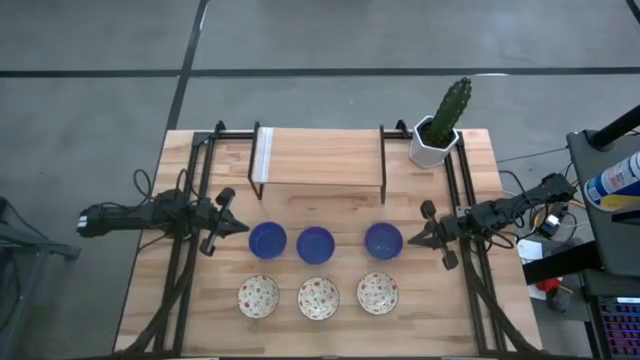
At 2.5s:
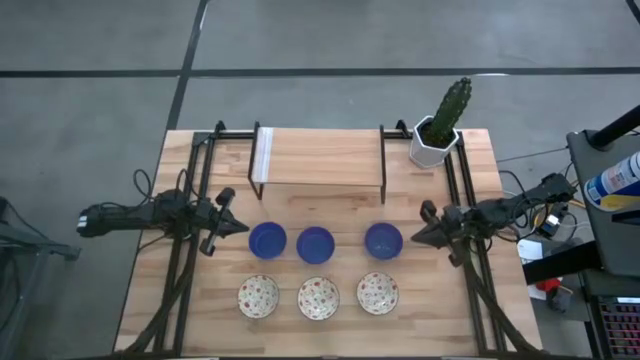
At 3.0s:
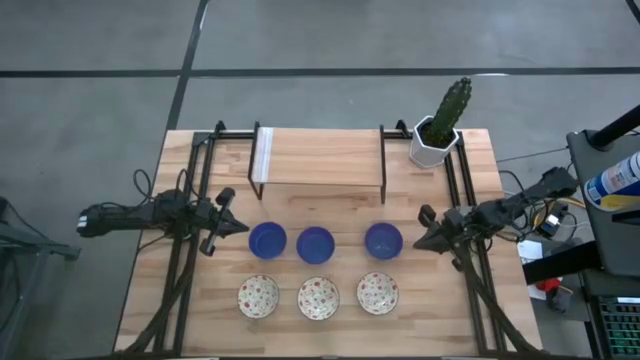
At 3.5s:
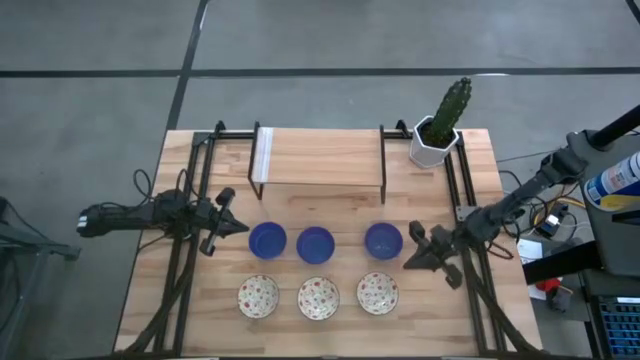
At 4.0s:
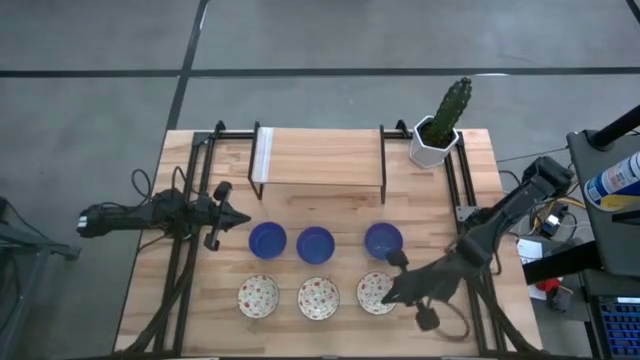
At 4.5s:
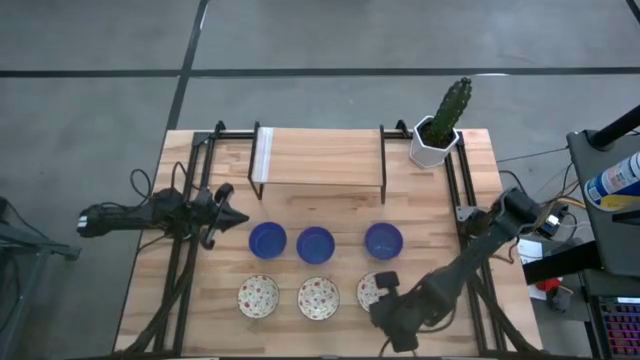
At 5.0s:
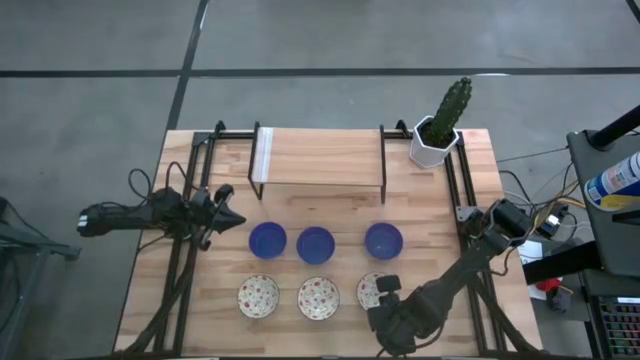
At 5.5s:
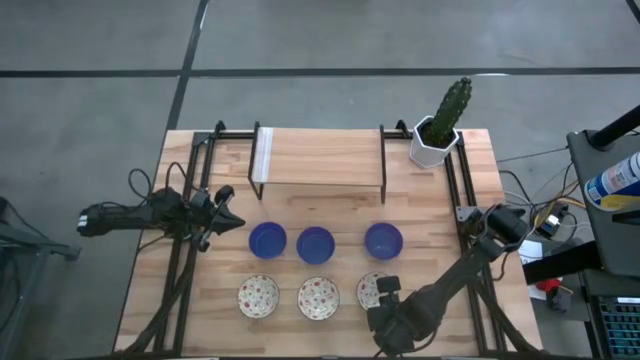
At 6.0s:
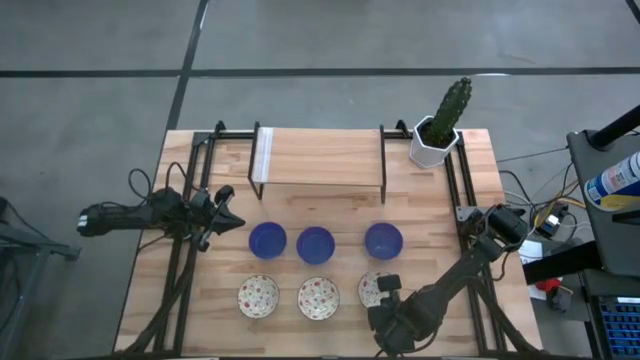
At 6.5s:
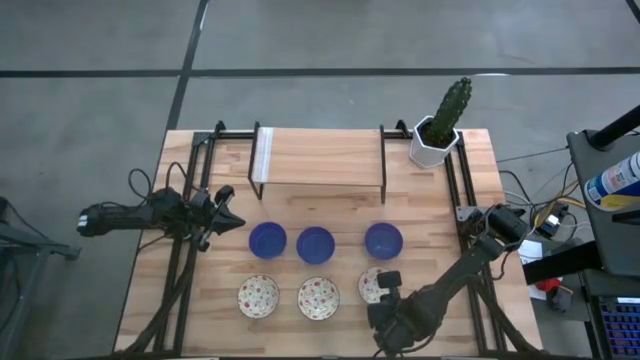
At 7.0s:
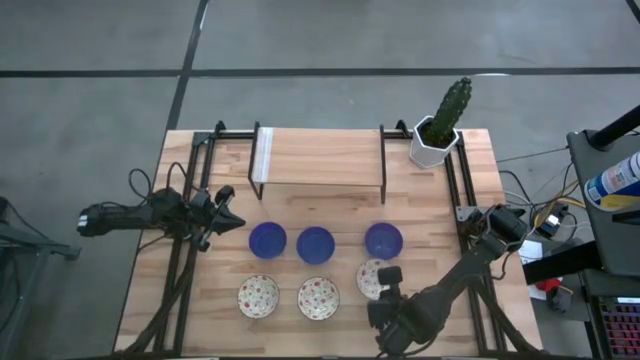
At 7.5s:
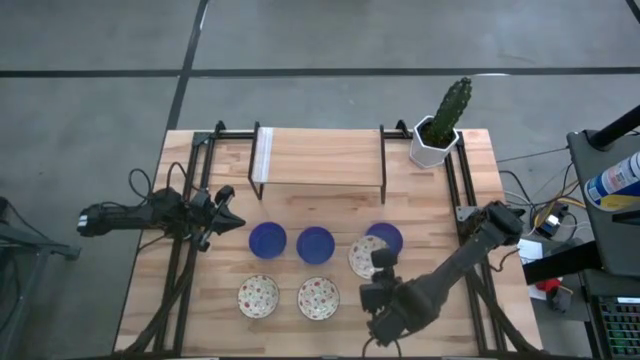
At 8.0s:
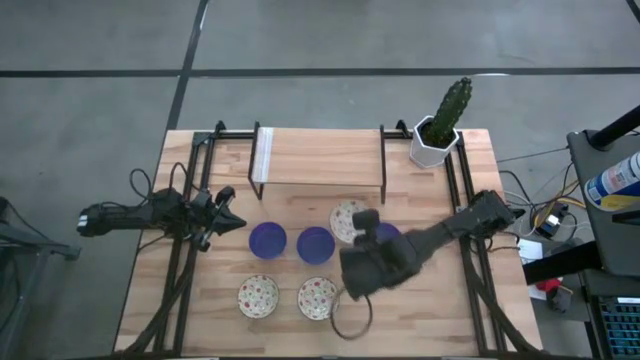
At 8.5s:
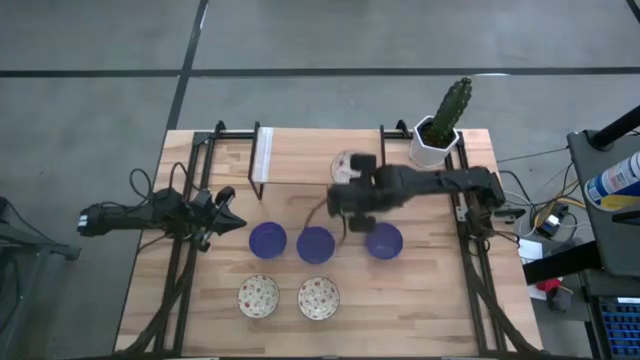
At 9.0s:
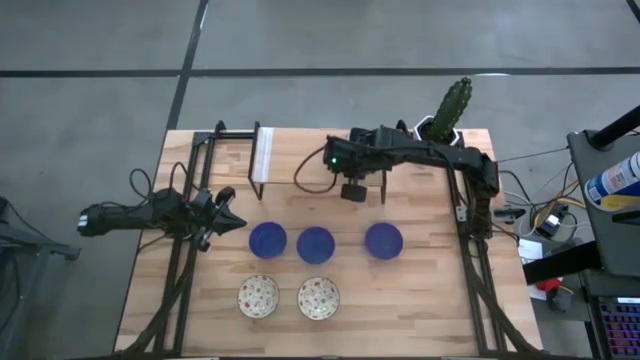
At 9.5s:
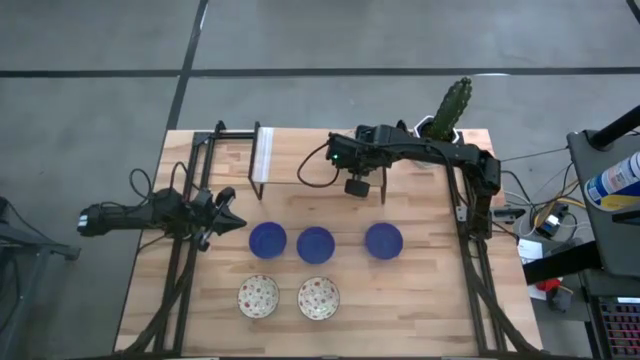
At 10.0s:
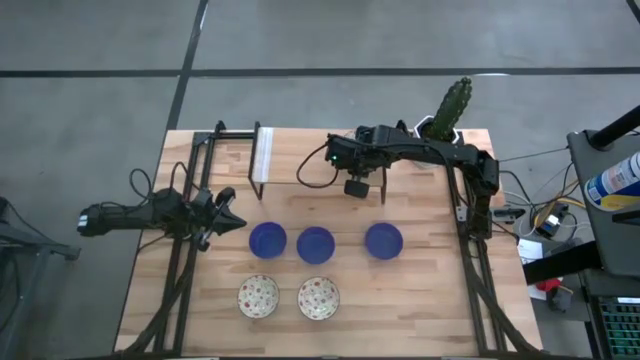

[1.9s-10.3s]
Task: Pick & Place Mini bowls
Put the right white bowl on the shelf

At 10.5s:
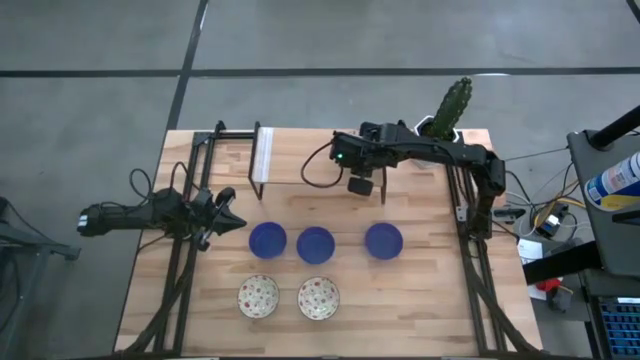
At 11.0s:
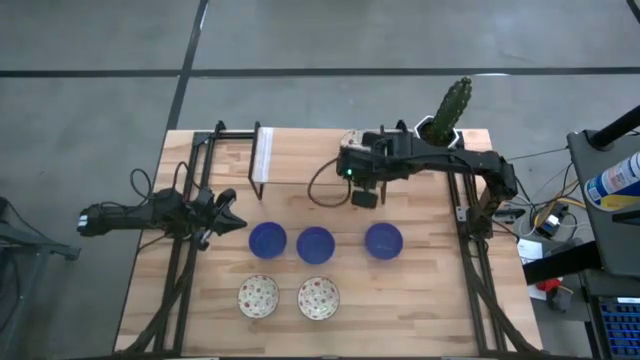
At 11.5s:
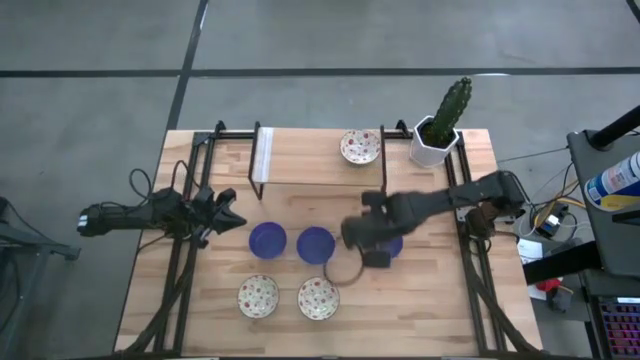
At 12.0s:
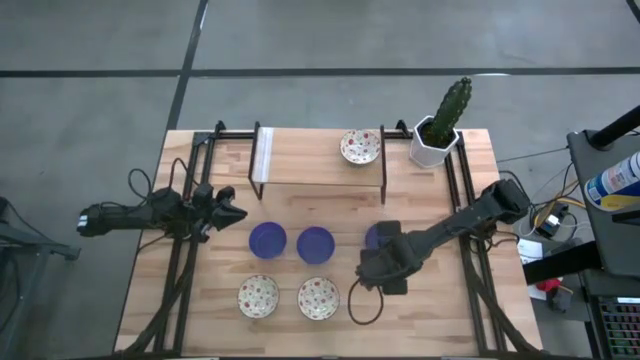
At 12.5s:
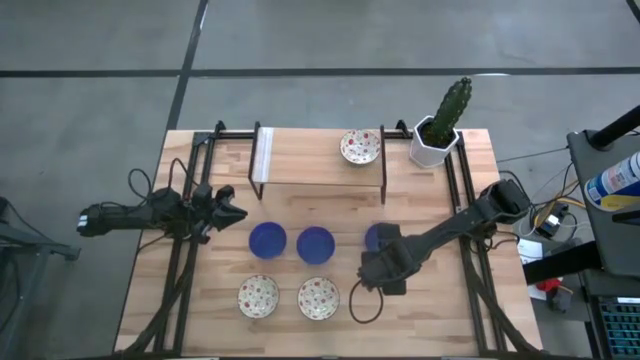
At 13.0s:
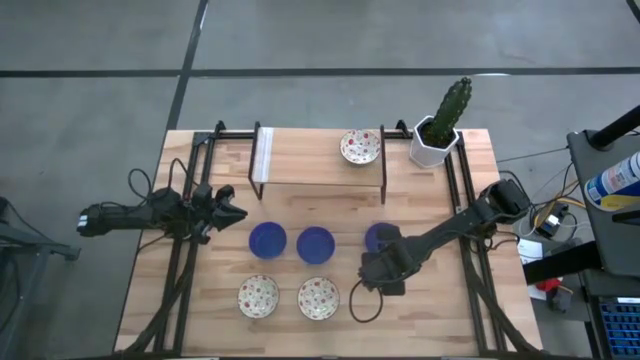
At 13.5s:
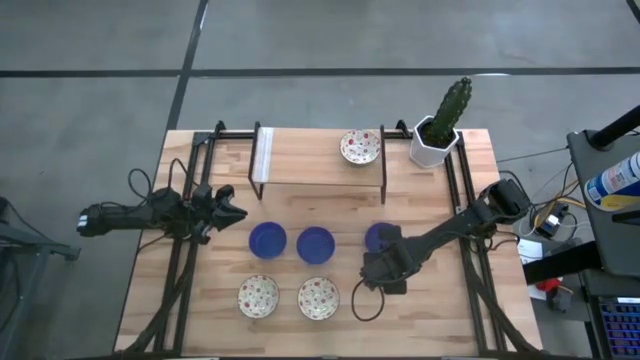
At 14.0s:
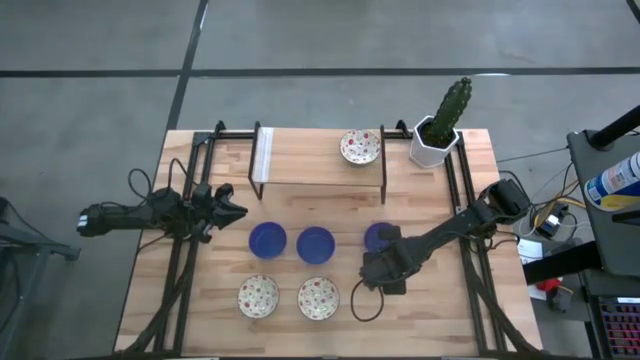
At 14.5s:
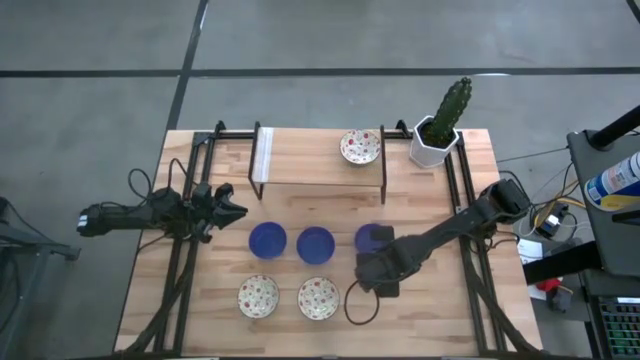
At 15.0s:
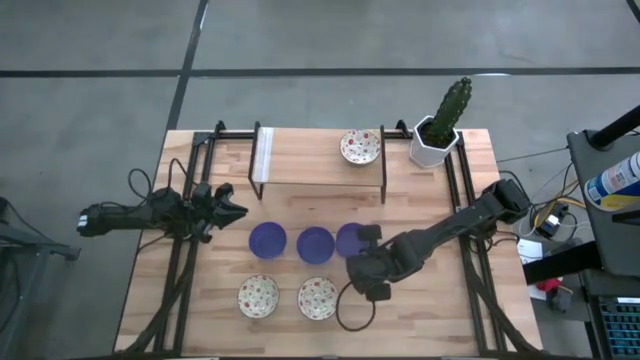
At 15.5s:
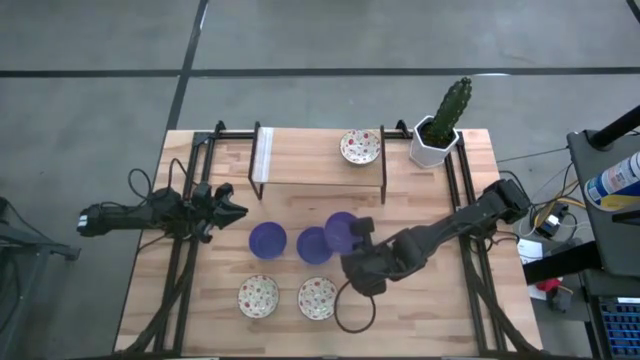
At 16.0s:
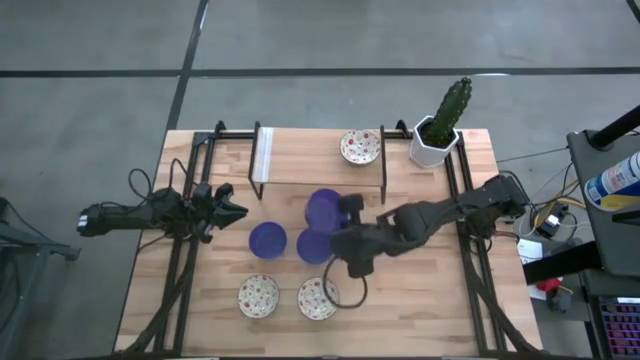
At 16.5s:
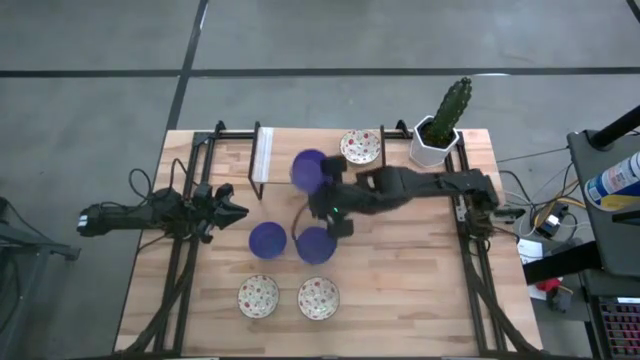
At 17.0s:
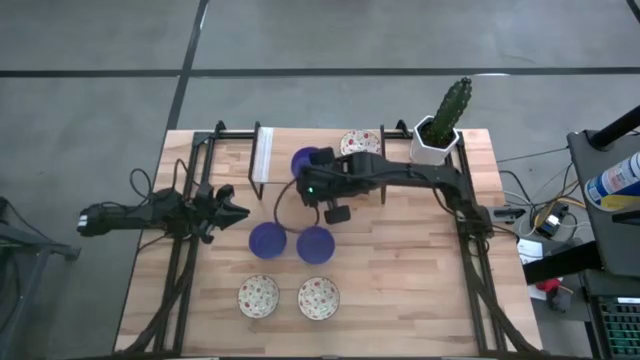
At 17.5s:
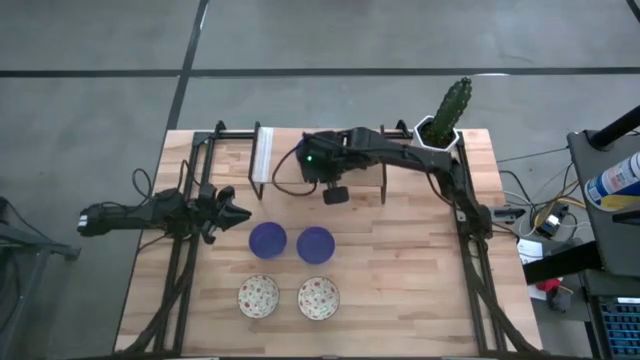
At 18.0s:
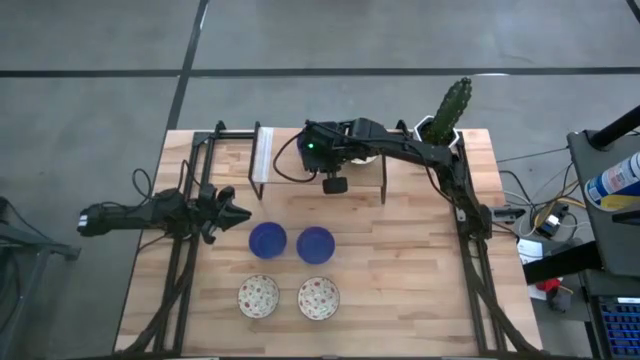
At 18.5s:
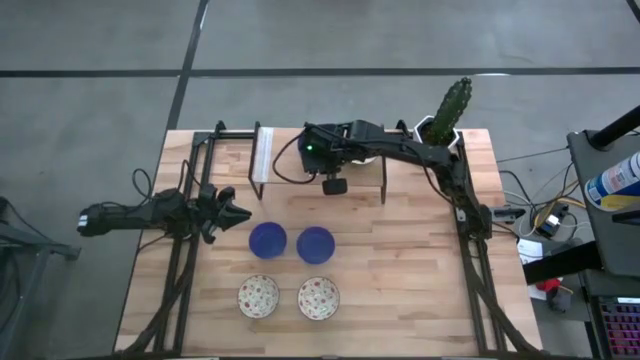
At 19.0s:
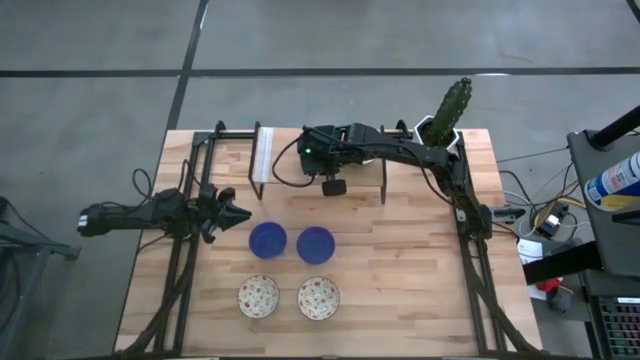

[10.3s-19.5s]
Put the right blue bowl on the shelf

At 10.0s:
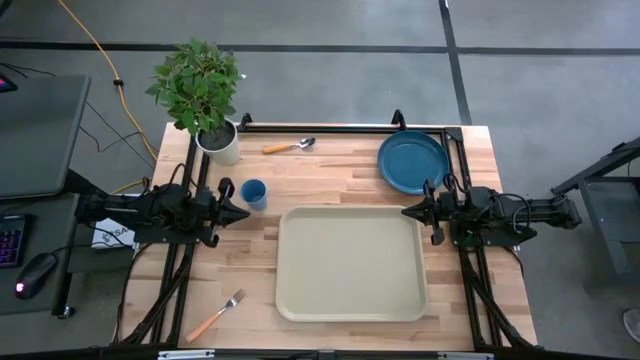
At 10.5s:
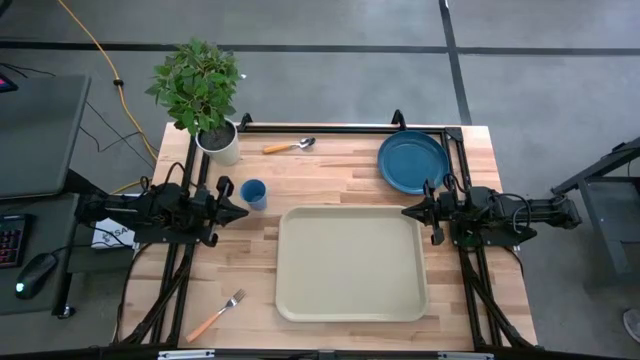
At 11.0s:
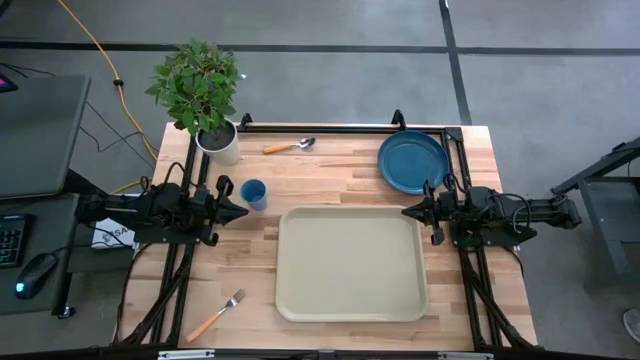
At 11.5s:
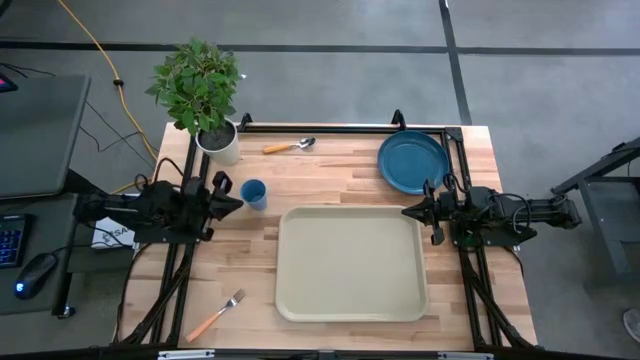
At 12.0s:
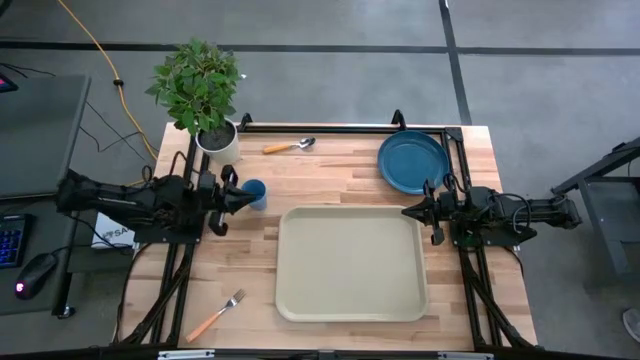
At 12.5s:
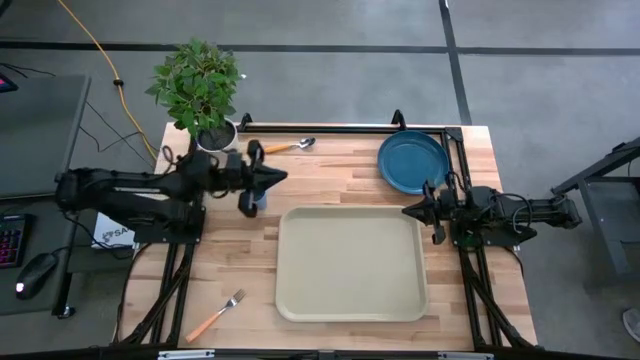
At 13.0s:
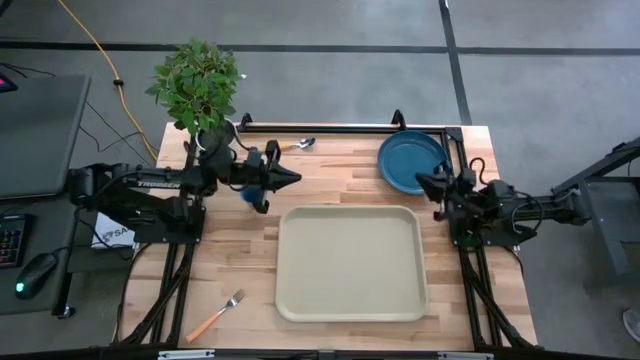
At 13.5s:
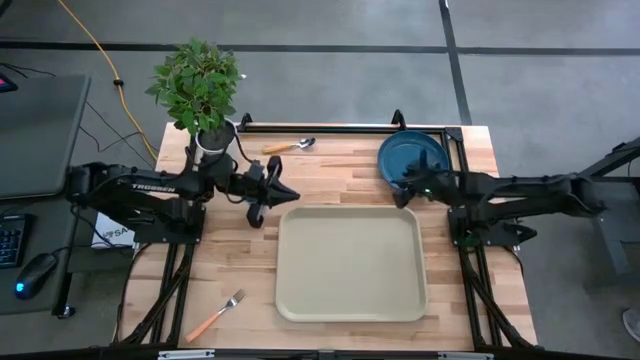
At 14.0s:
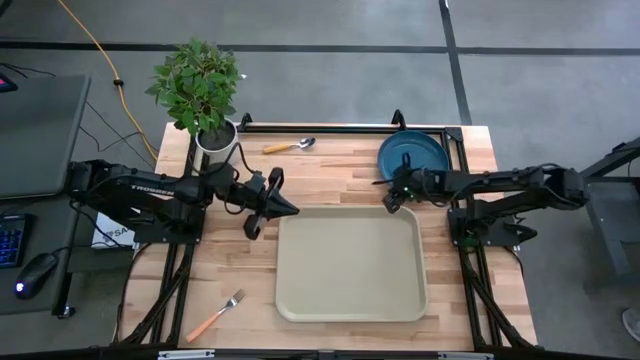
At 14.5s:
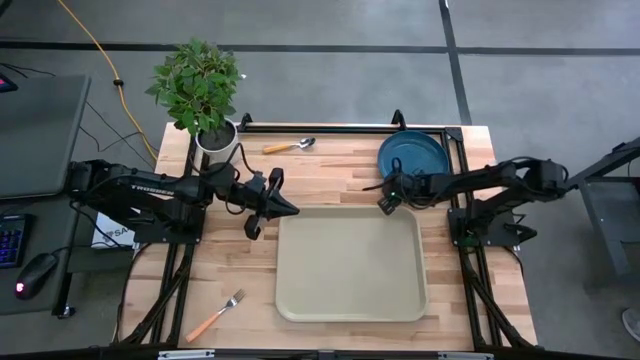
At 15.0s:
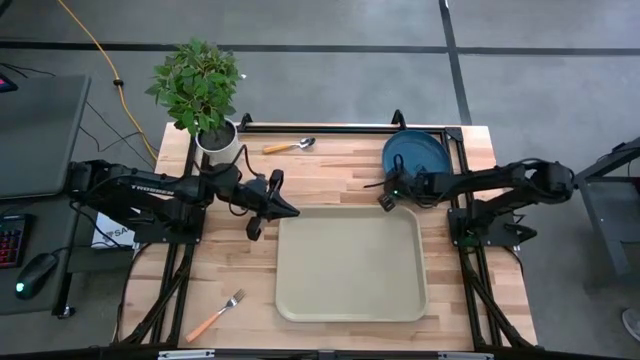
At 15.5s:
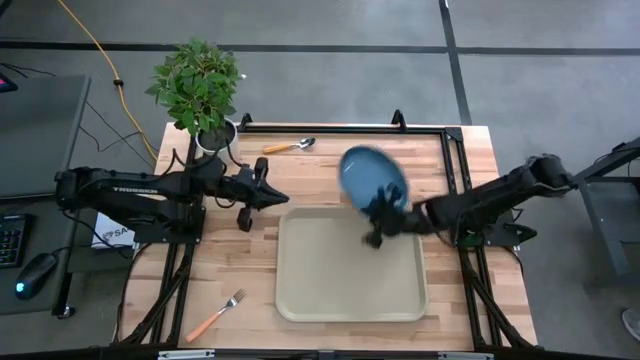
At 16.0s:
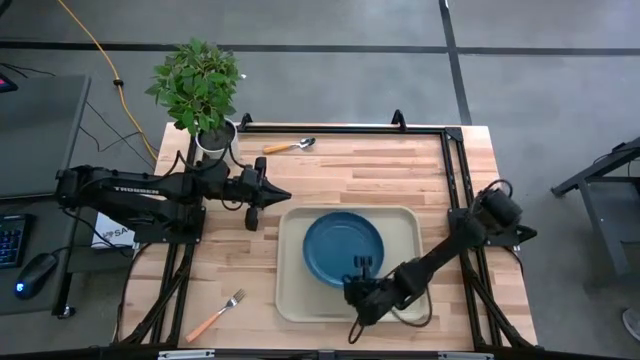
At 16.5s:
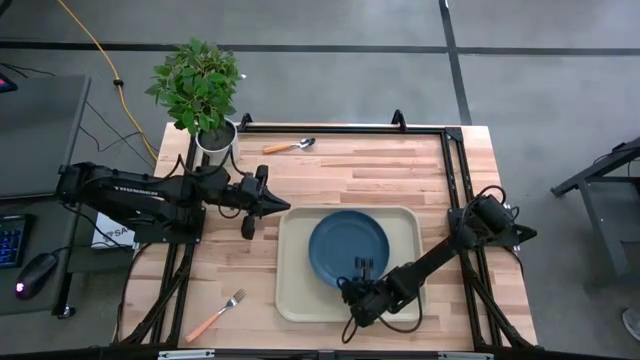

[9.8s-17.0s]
Task: Pick and place plate/cup/fork/spoon on tray
Put the blue plate on the center of the white serving tray
